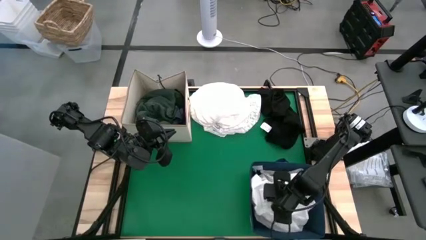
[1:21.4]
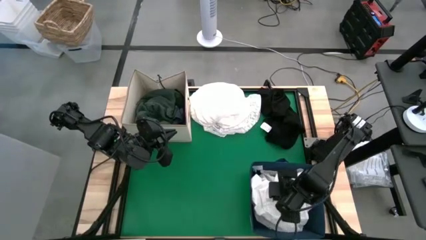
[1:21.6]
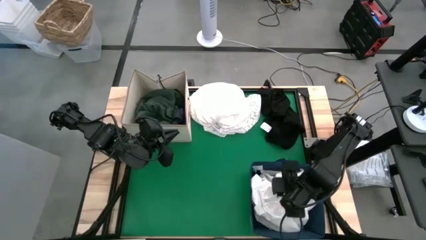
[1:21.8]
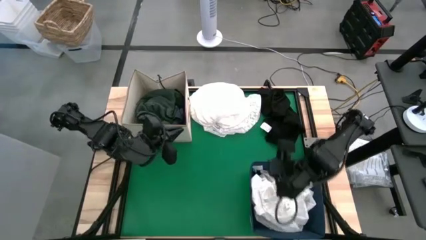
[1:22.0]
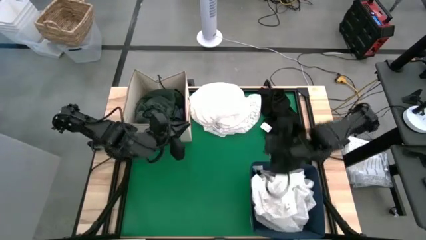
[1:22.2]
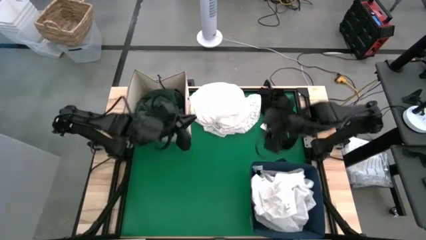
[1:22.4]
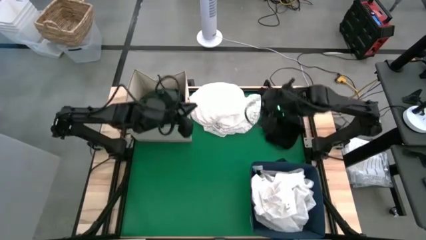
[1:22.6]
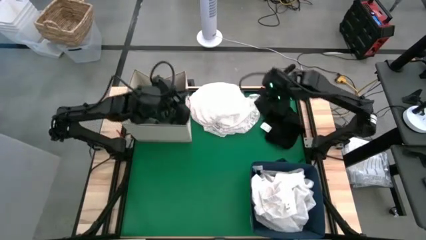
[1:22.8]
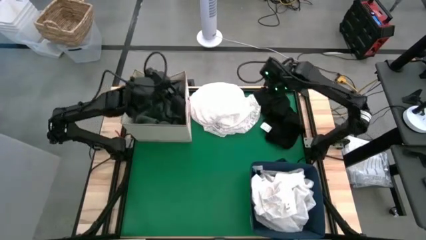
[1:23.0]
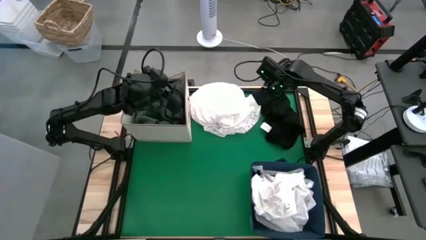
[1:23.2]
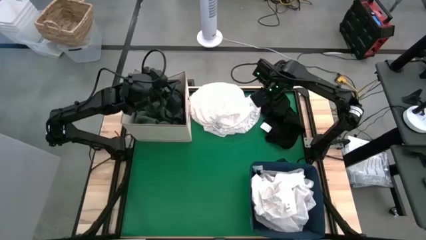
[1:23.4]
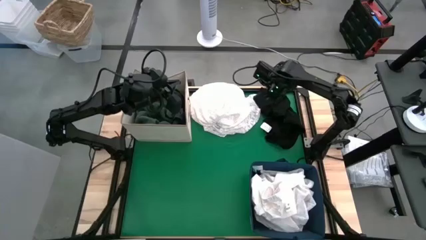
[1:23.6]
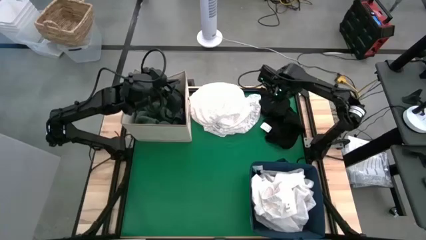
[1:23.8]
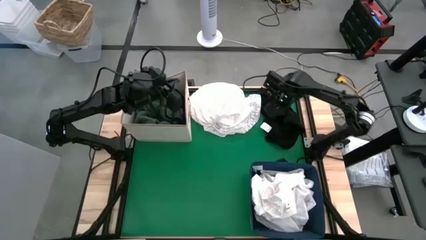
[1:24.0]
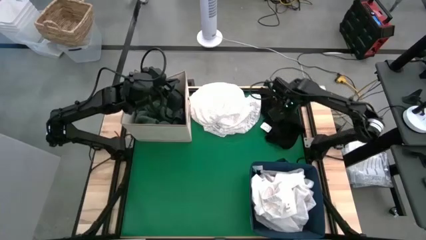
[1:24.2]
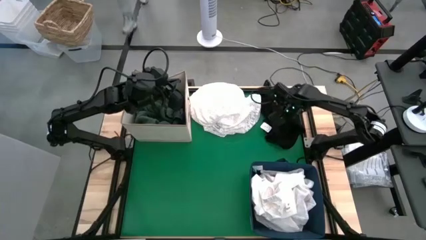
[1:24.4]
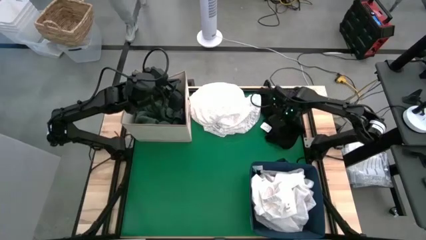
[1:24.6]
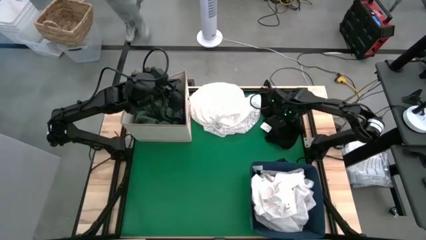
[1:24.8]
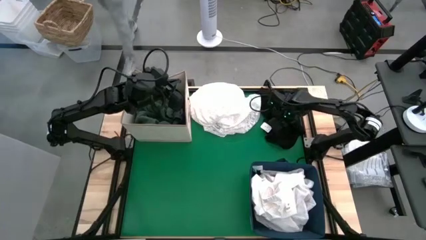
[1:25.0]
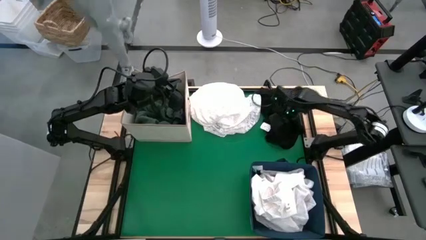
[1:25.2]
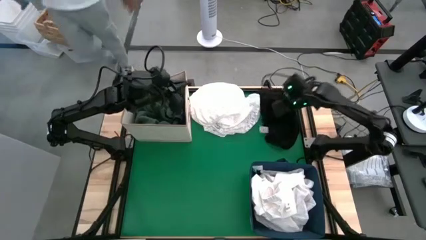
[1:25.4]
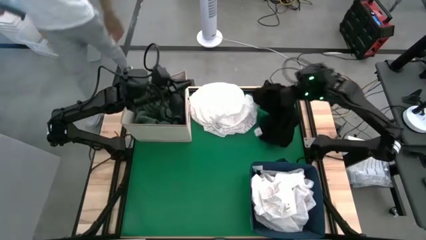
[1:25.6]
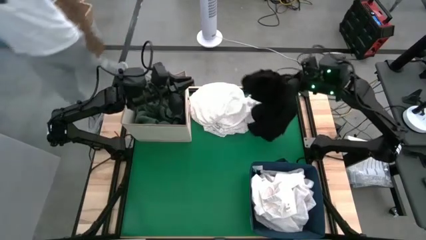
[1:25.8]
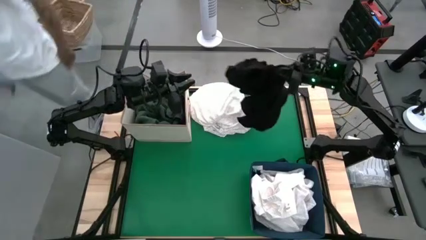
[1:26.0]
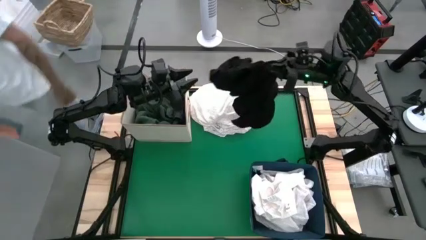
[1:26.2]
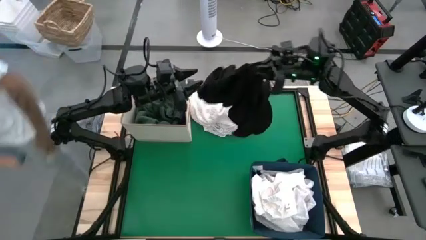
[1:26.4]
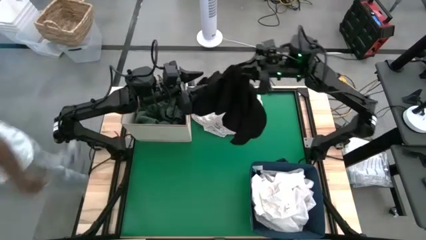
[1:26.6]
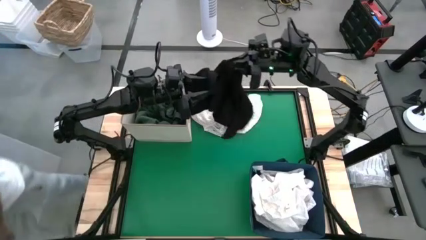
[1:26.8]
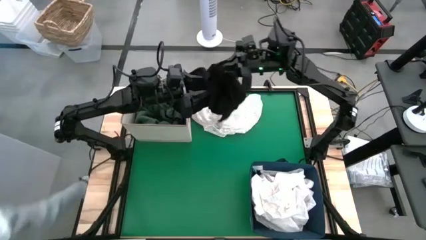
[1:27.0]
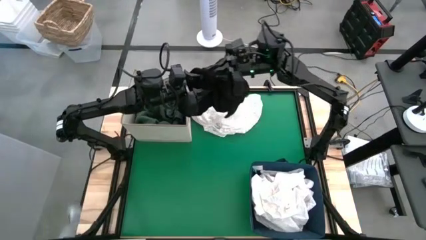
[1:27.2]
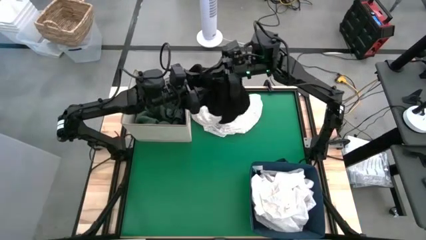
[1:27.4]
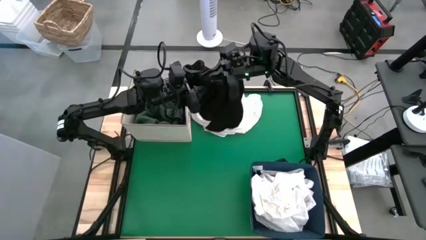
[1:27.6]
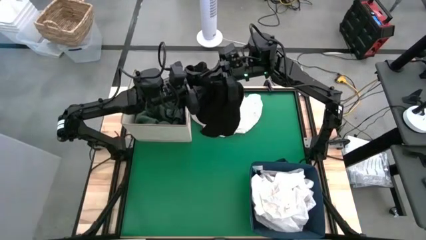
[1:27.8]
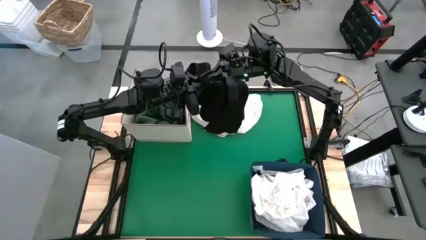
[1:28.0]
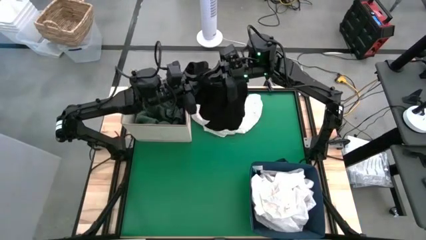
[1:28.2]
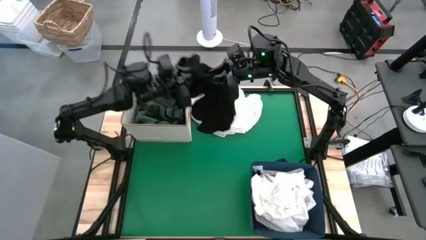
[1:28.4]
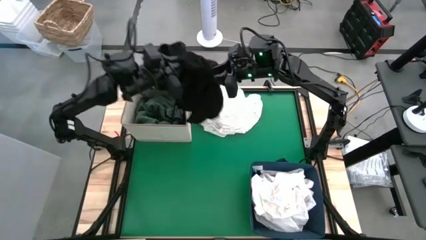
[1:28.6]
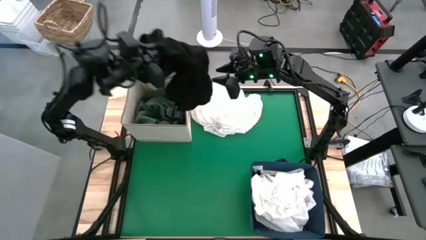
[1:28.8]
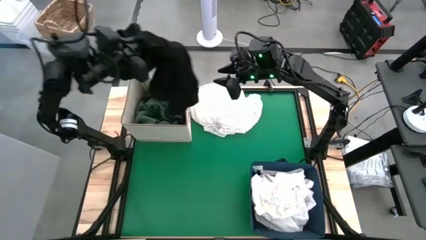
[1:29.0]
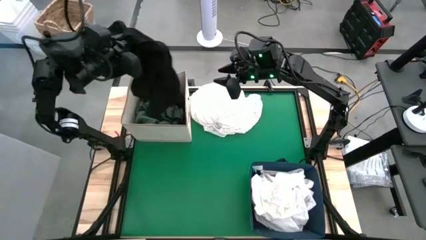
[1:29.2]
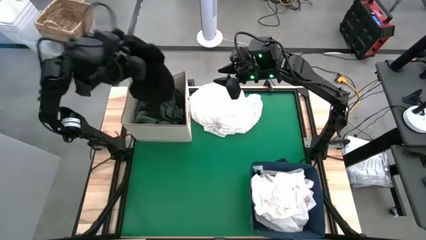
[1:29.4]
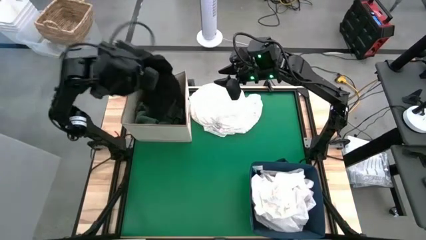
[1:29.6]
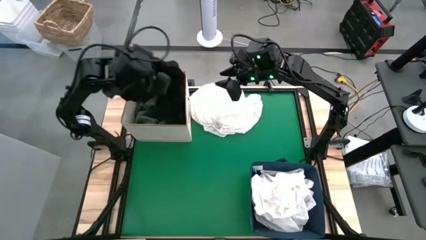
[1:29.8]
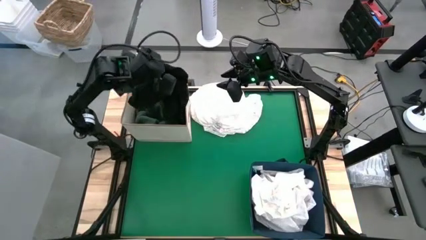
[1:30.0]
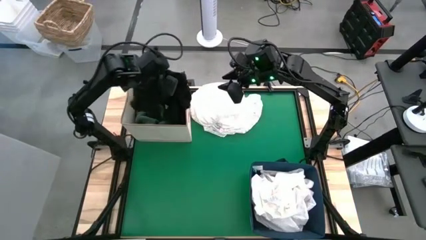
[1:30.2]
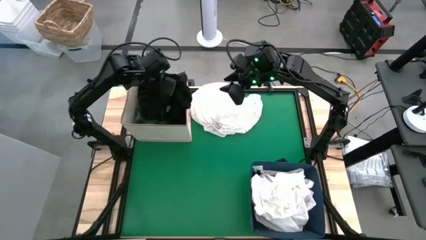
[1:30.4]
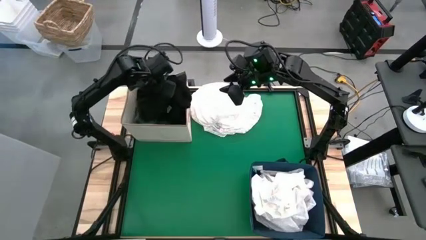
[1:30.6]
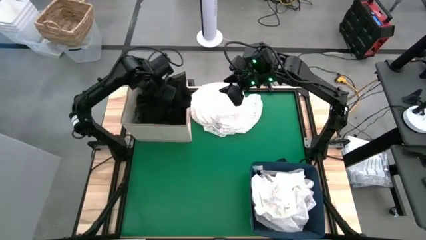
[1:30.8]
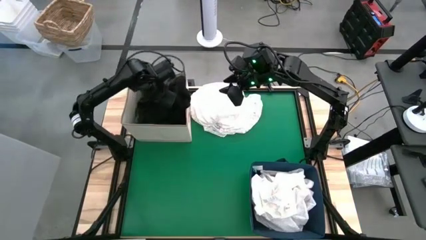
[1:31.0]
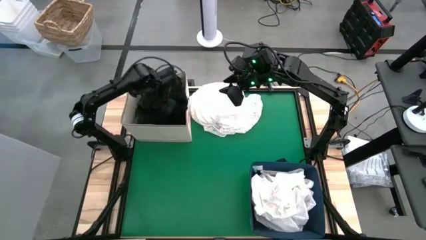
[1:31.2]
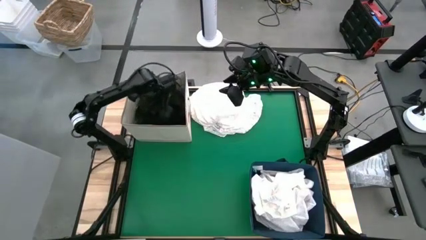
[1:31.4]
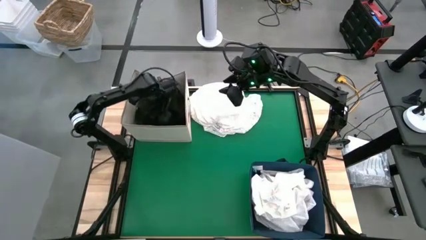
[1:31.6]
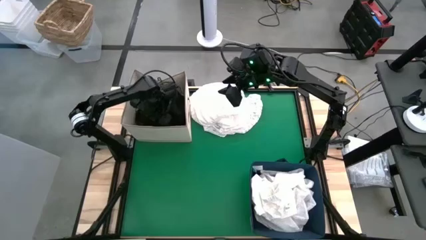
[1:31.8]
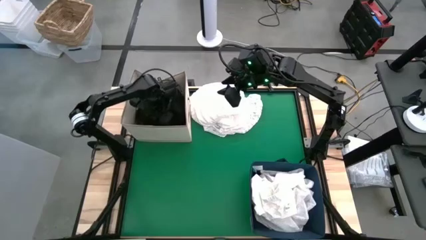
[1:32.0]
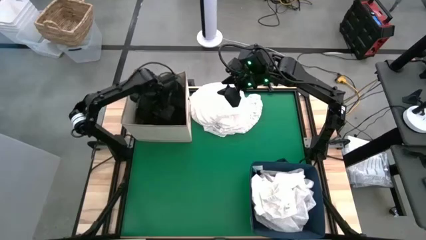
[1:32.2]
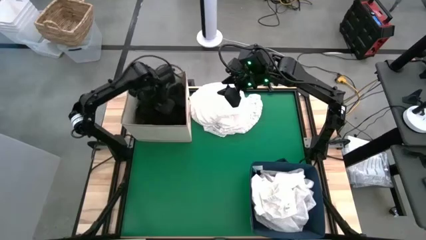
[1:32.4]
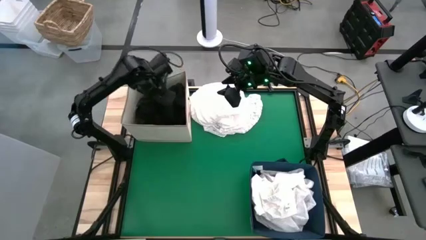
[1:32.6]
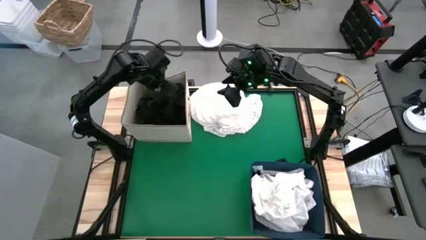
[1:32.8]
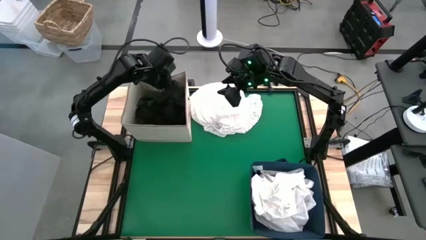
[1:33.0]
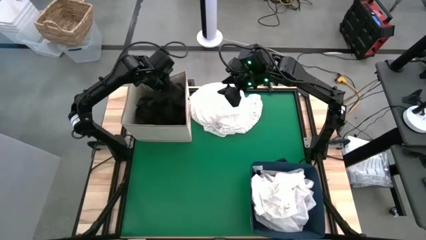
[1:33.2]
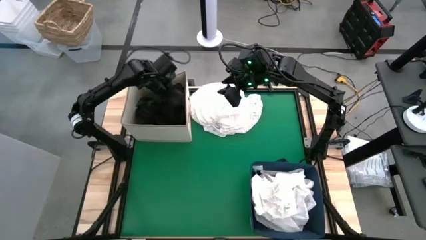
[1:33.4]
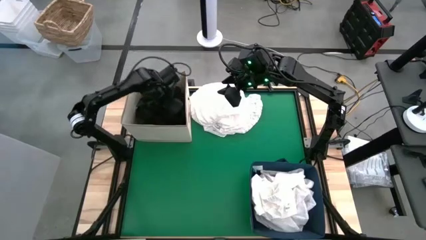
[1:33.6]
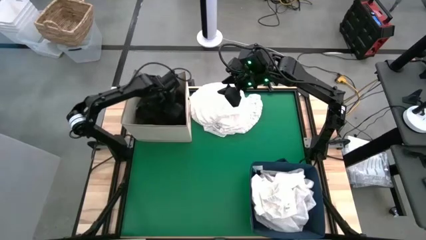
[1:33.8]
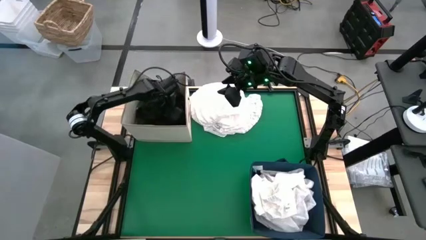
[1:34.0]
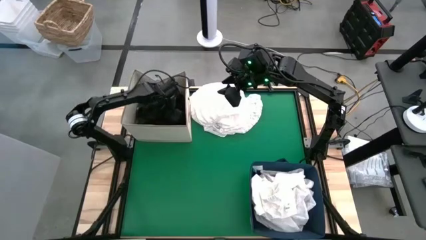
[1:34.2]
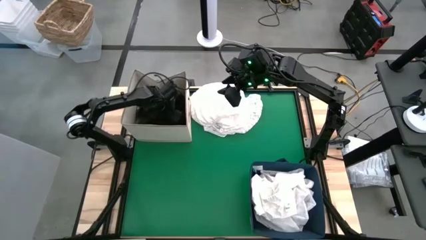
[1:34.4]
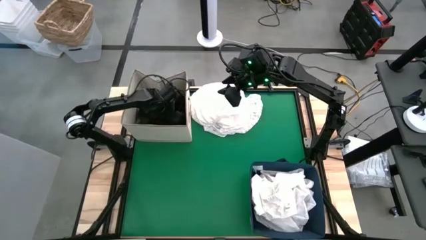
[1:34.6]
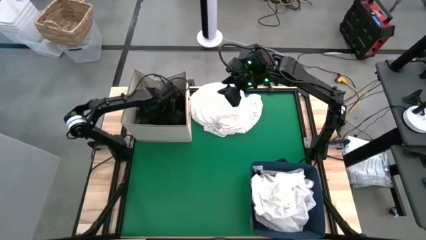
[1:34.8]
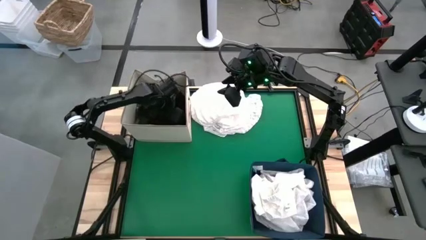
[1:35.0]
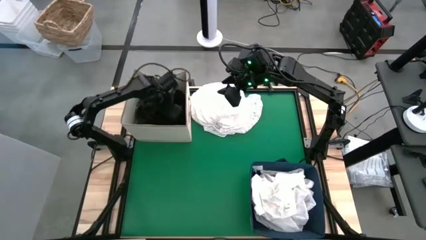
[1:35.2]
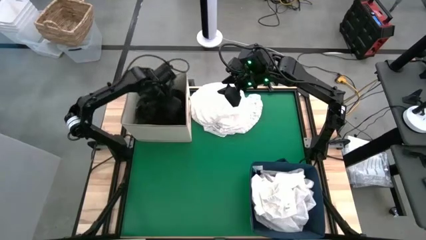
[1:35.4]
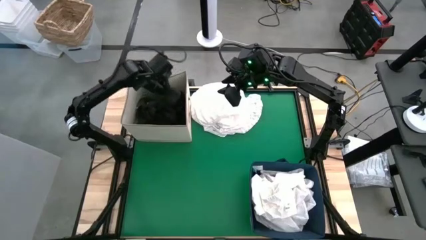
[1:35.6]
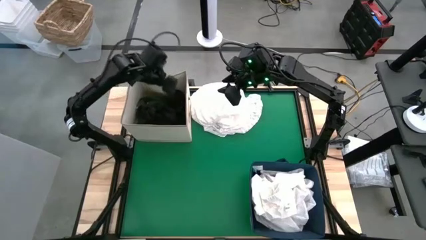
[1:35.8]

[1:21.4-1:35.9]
Put the black cloth into the white bin
